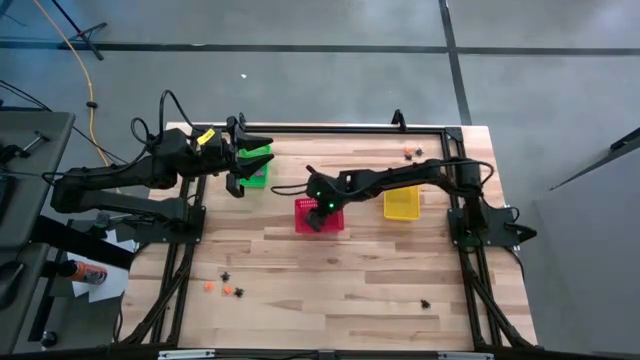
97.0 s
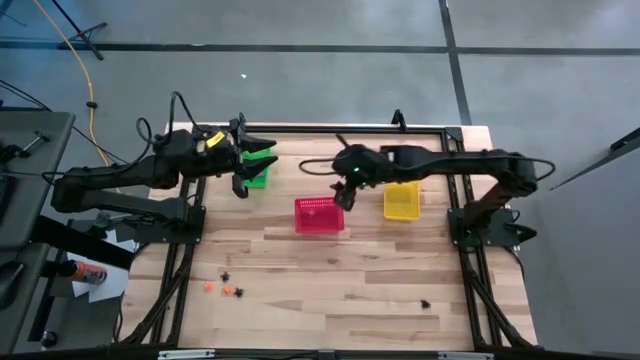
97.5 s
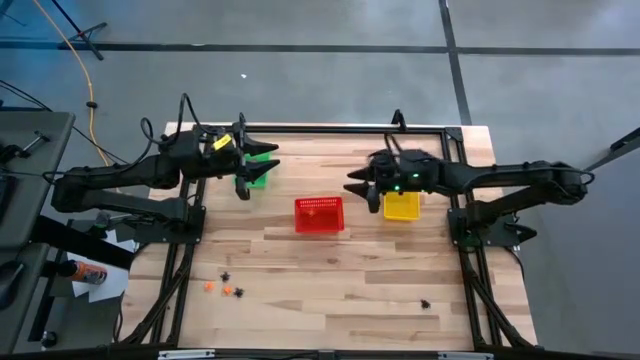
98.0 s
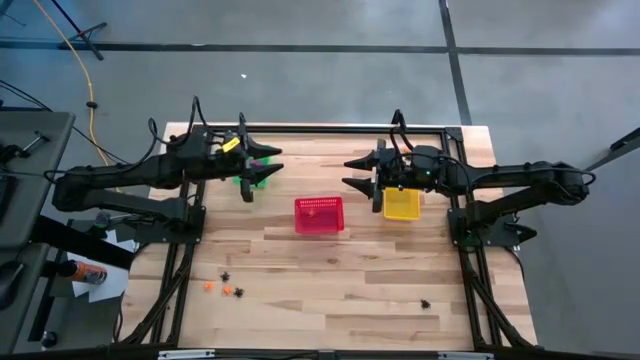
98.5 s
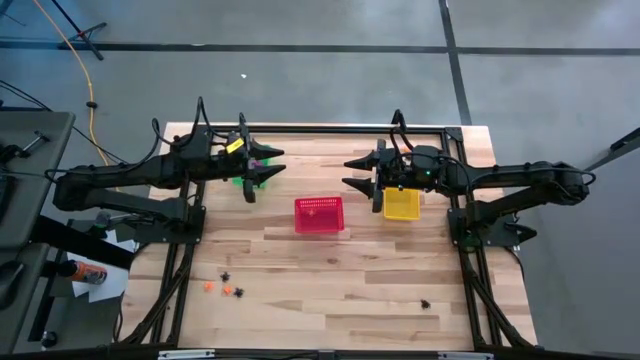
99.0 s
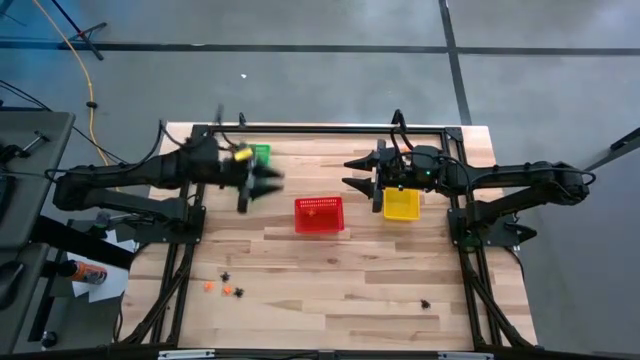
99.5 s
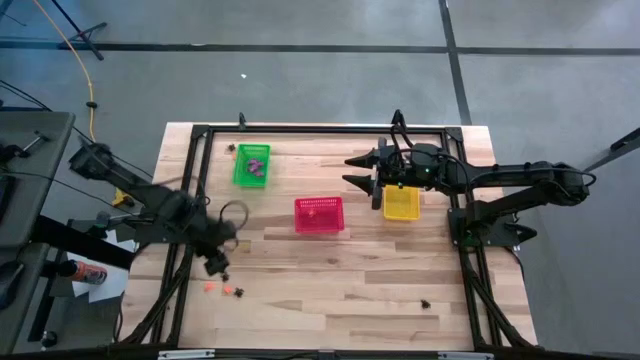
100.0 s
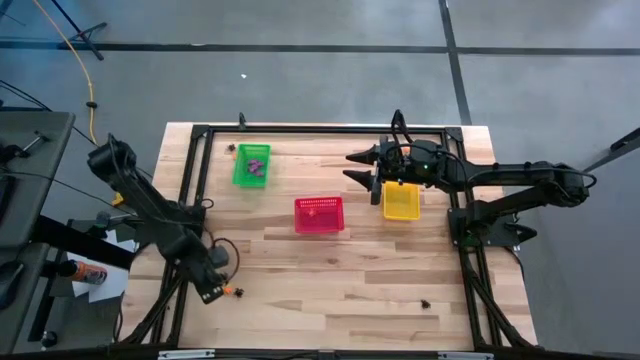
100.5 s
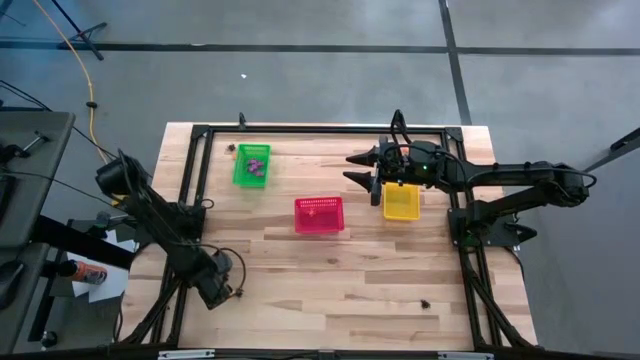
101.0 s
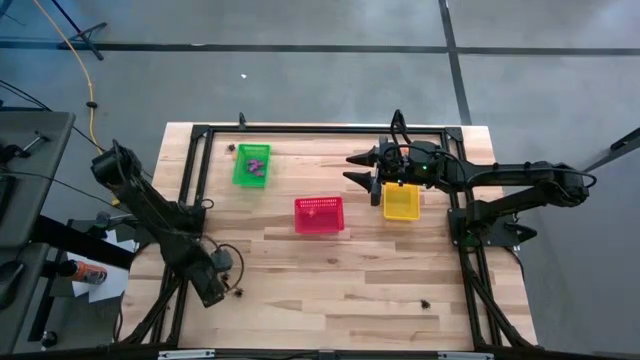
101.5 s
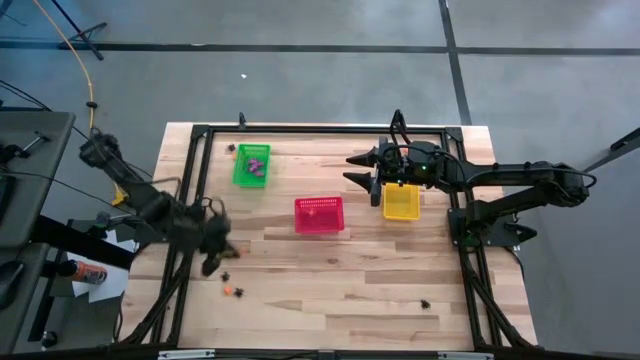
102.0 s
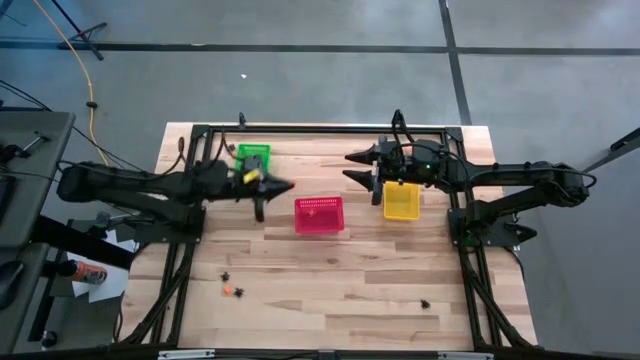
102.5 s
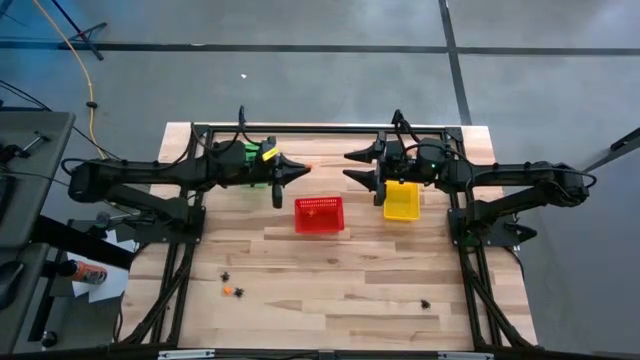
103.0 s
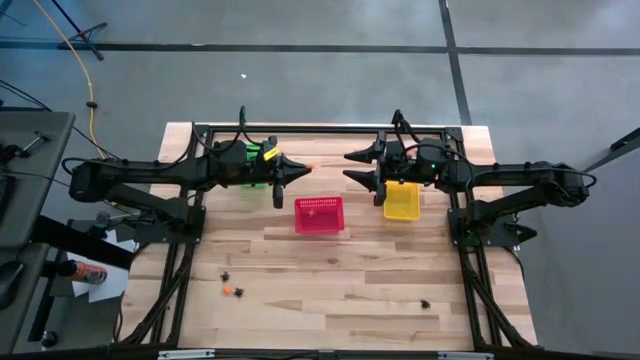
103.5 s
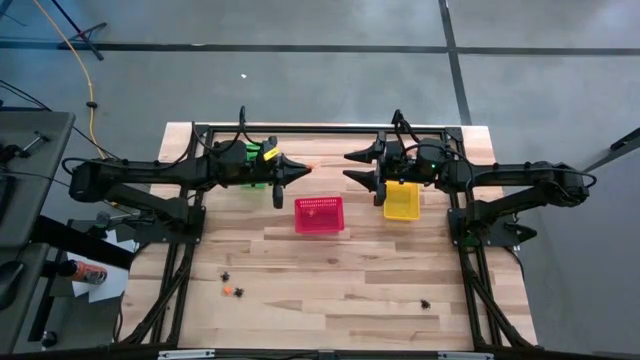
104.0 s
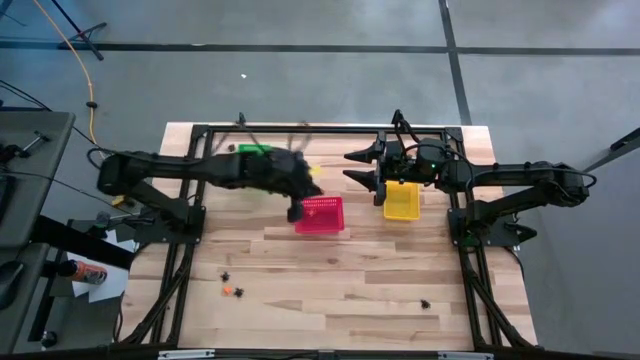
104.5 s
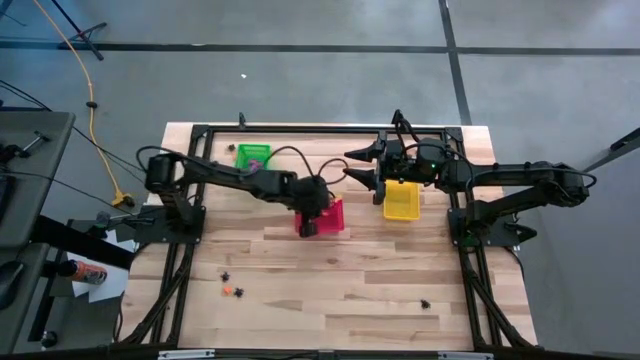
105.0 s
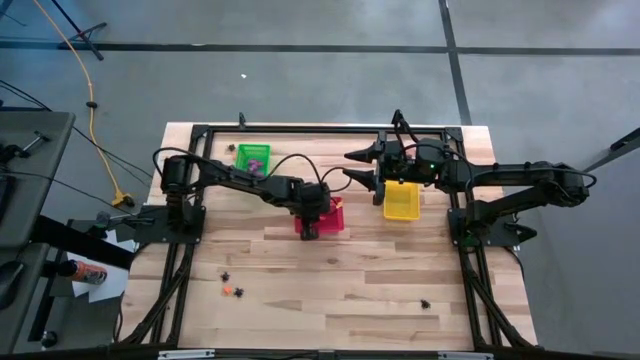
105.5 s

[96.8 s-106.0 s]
Task: Sort Halloween decoration
Put the orange spider toy into the red bin

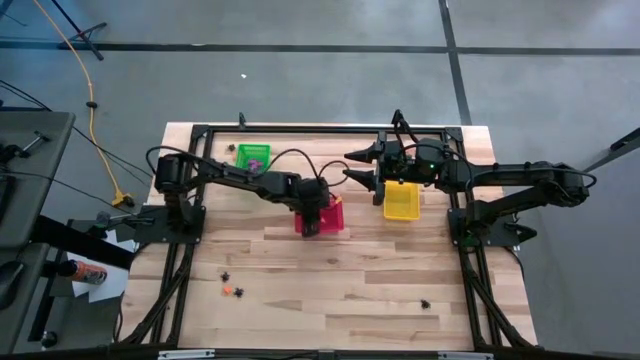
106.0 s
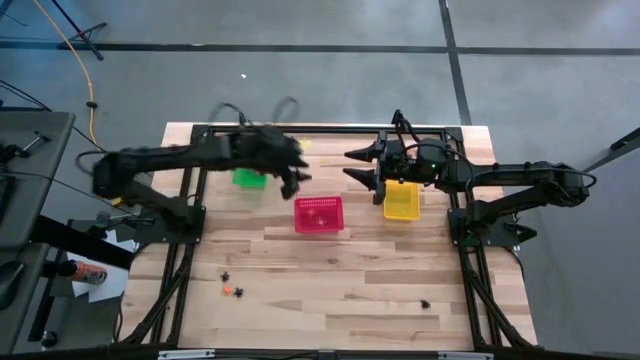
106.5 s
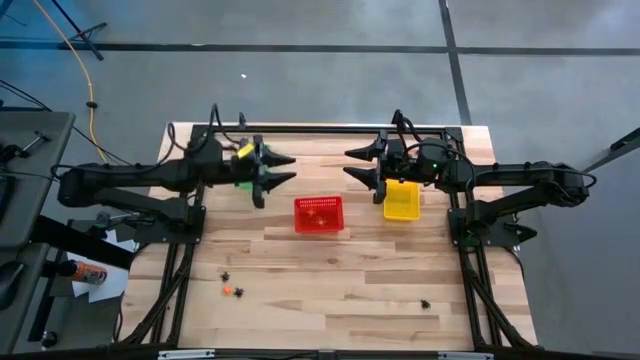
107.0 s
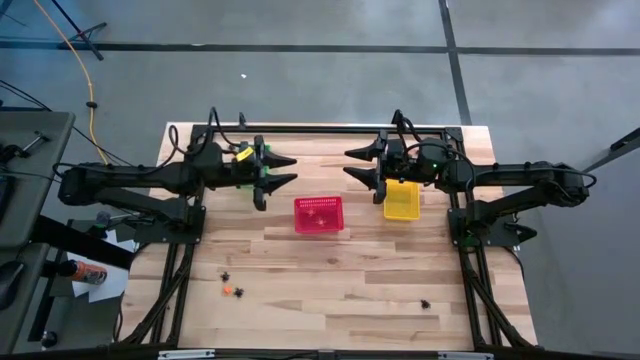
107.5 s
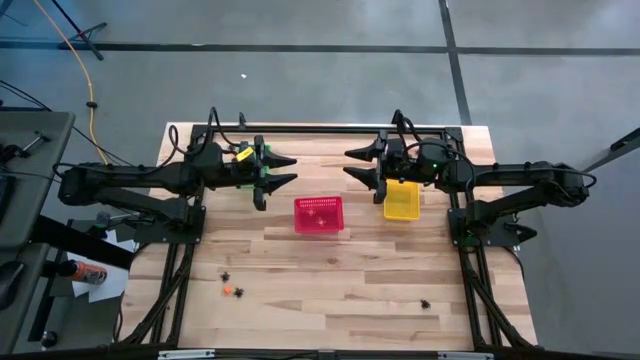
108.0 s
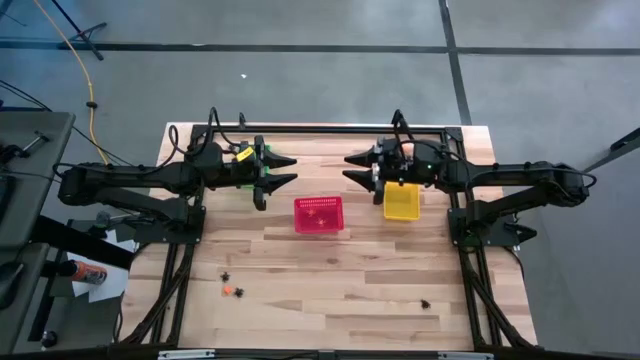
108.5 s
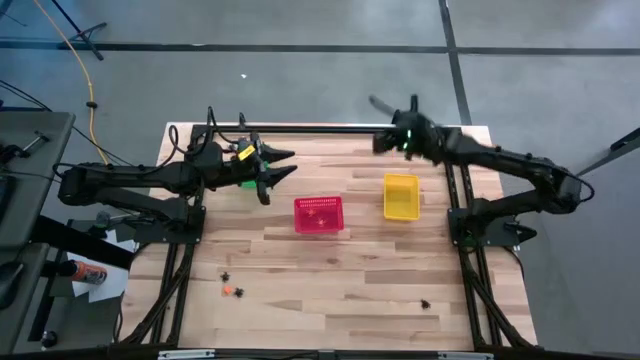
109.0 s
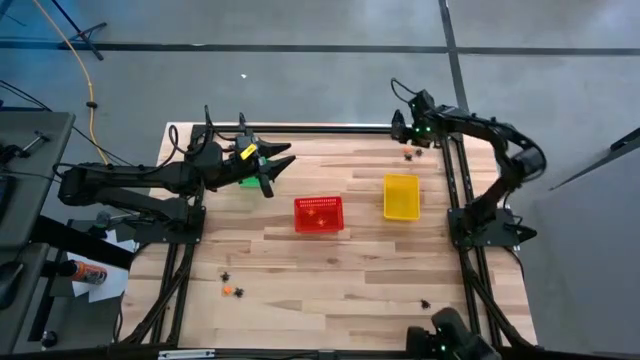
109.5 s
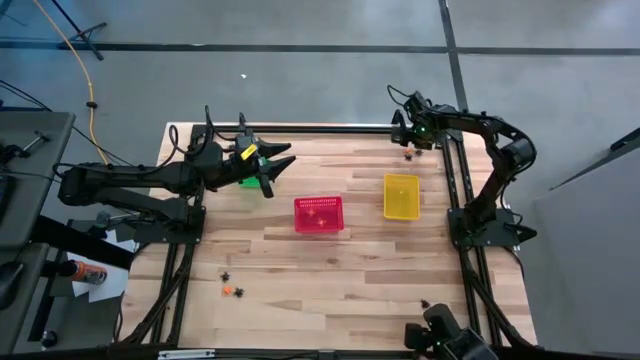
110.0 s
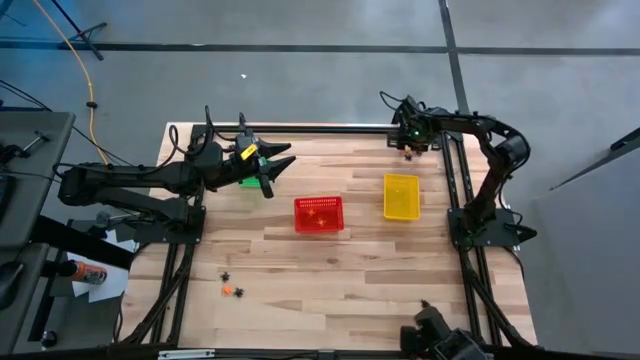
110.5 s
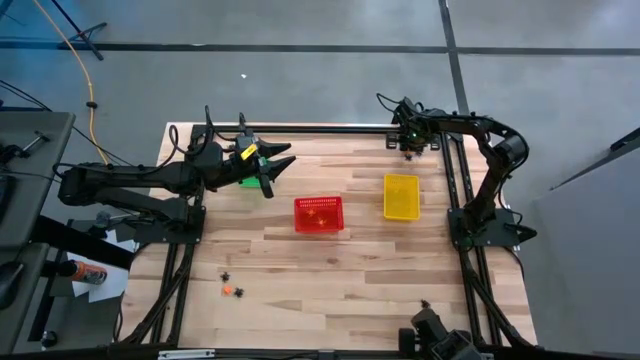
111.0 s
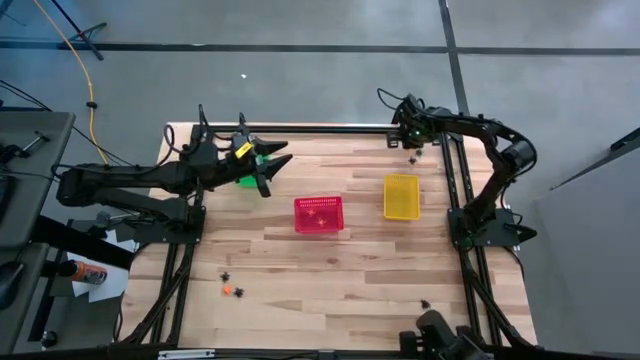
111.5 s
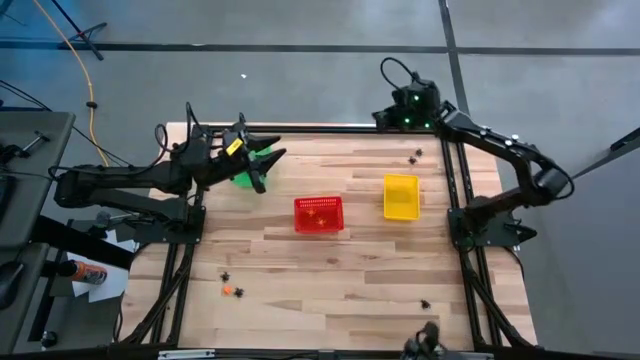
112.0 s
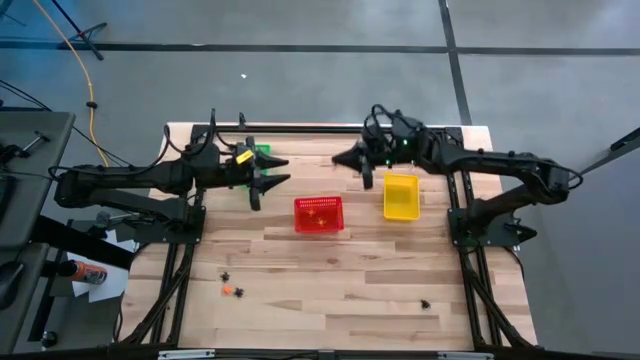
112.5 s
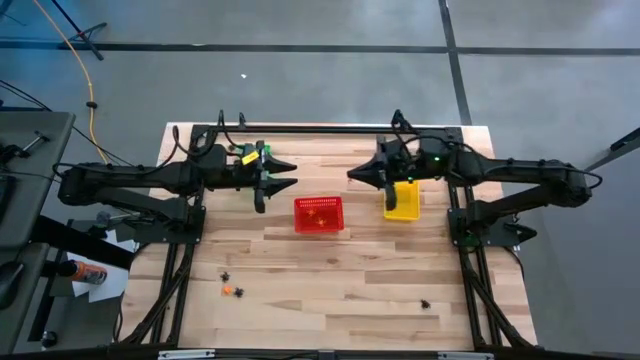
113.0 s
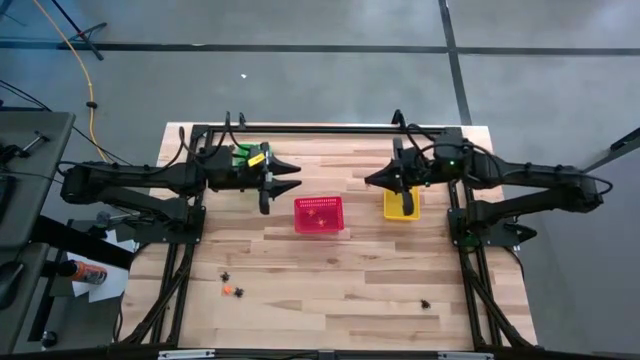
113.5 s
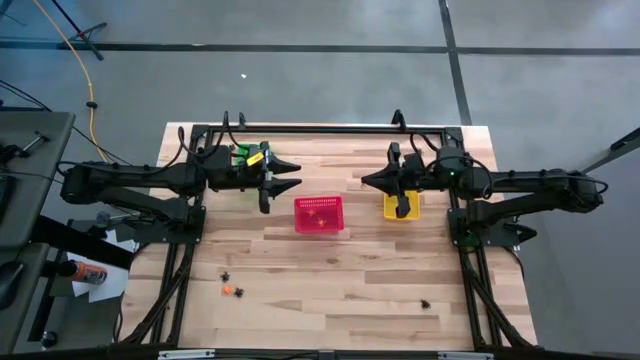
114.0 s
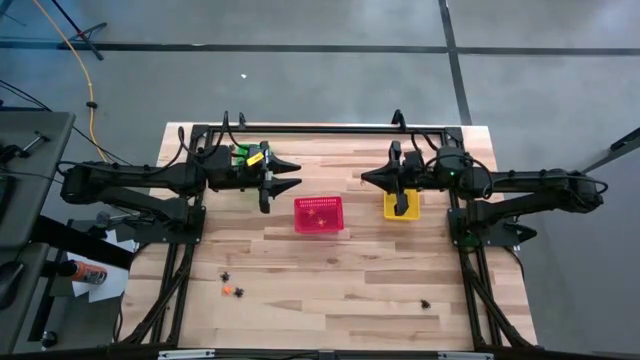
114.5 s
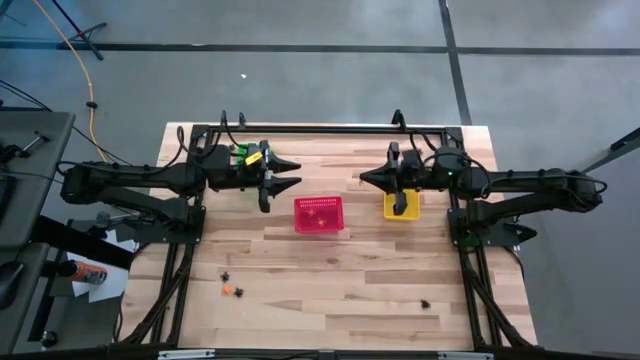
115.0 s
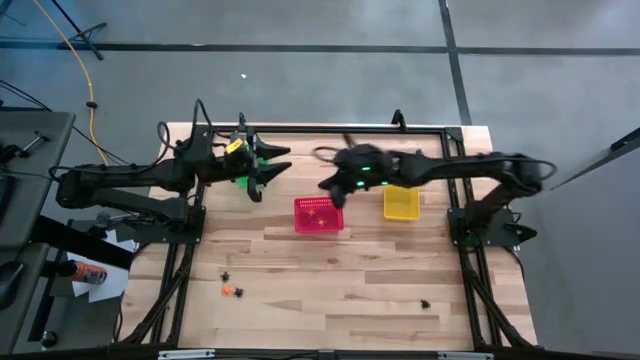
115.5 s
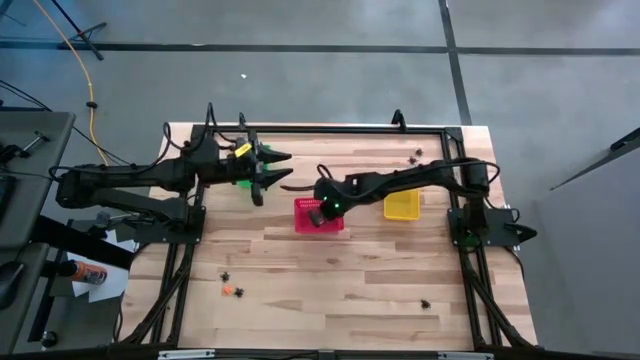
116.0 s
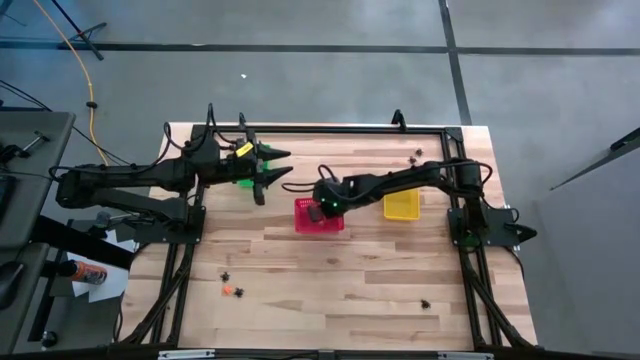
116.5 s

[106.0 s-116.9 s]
Put the orange spider toy into the red bin

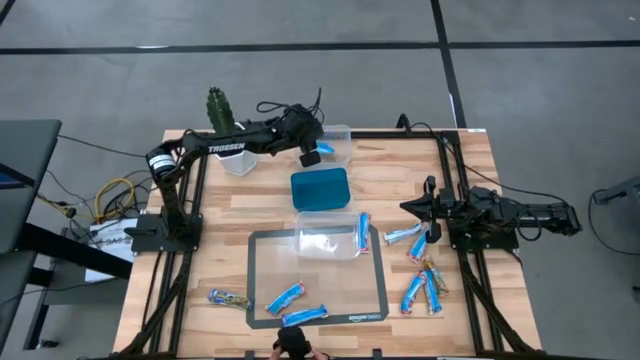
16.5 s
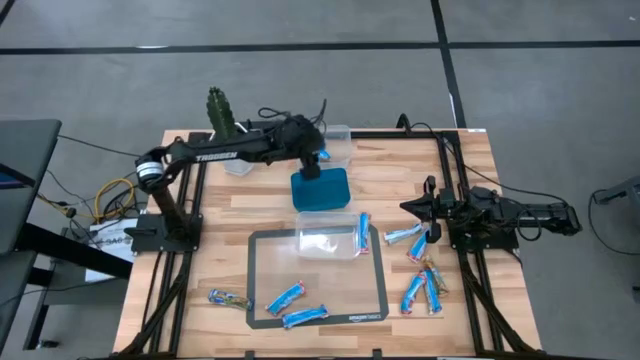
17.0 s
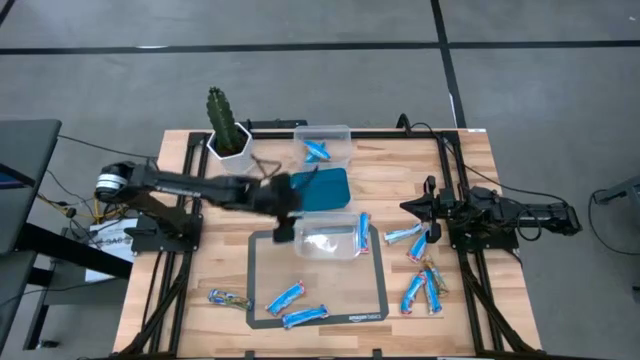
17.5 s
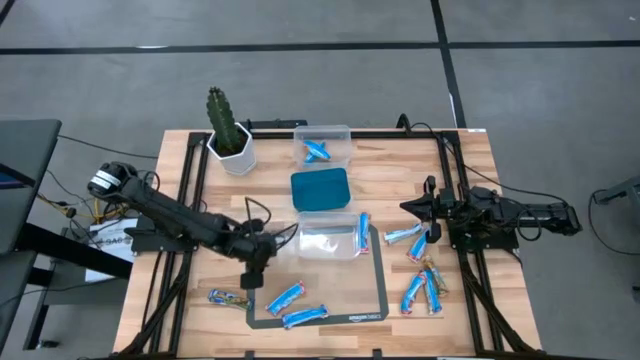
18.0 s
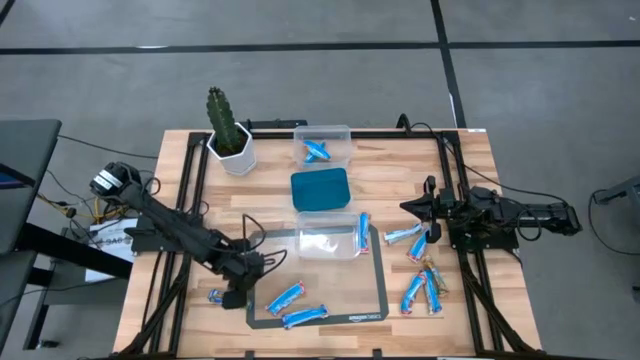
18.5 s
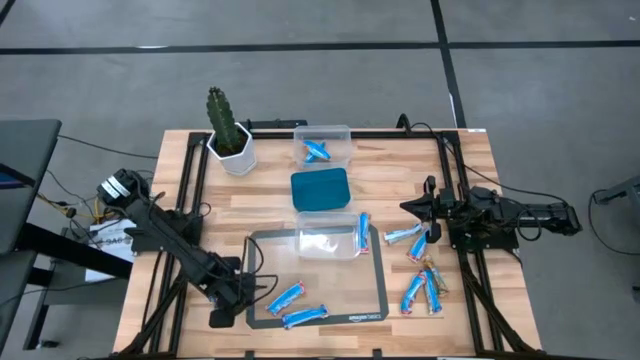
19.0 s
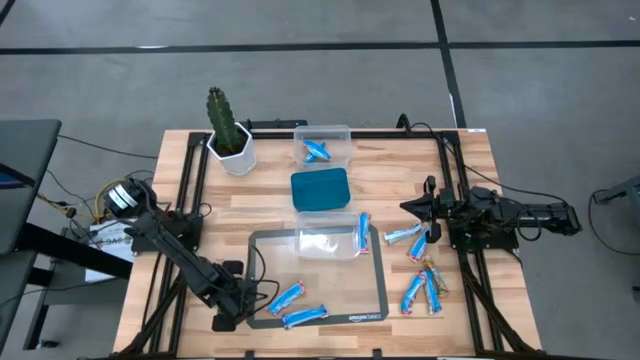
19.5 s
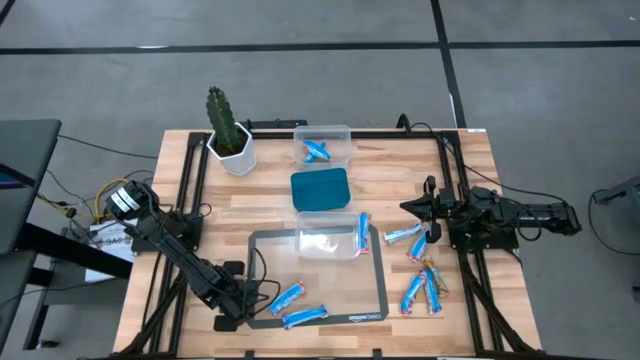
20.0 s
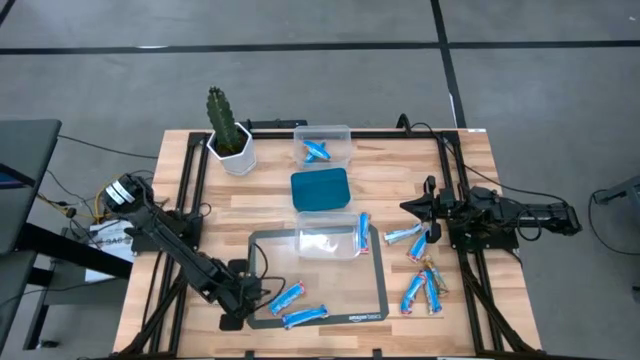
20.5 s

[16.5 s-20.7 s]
Task: Pick and place Granola Bars by type
Put the left blue granola bar into the blue bin
